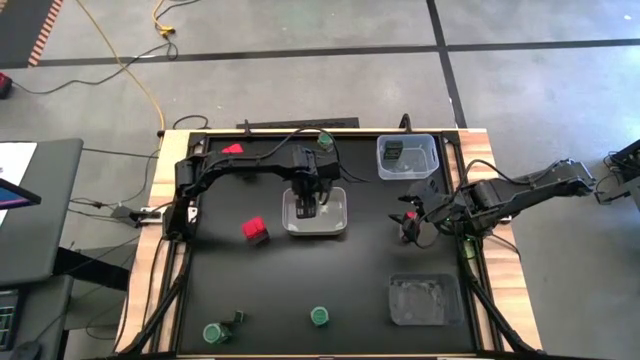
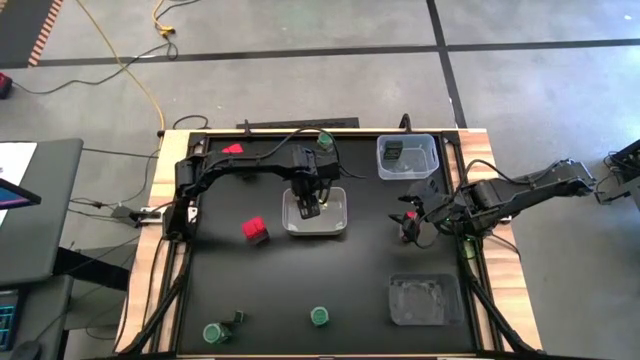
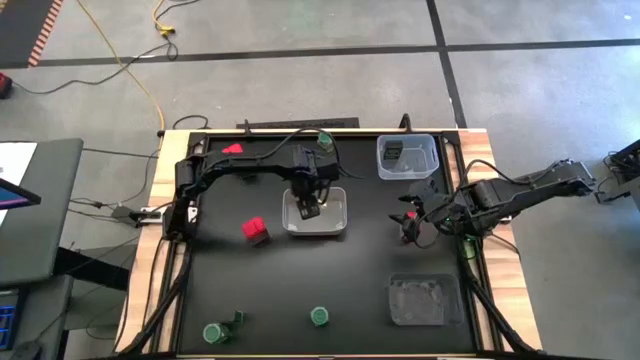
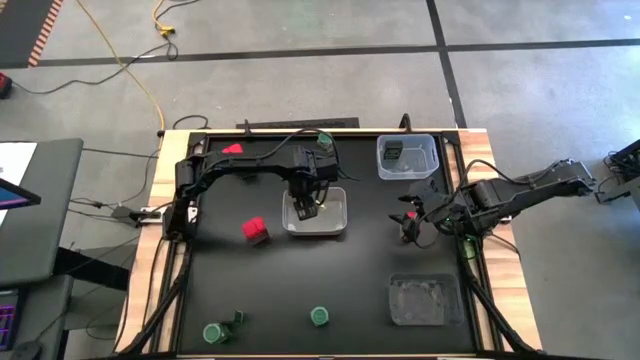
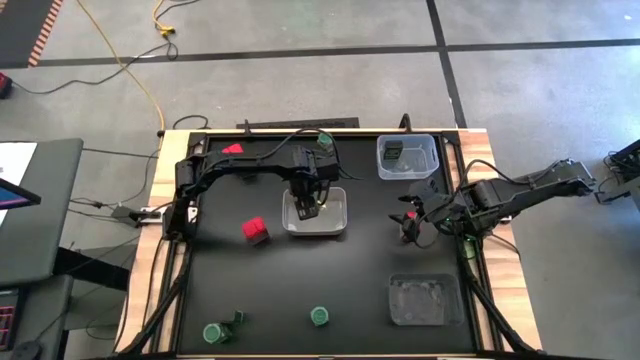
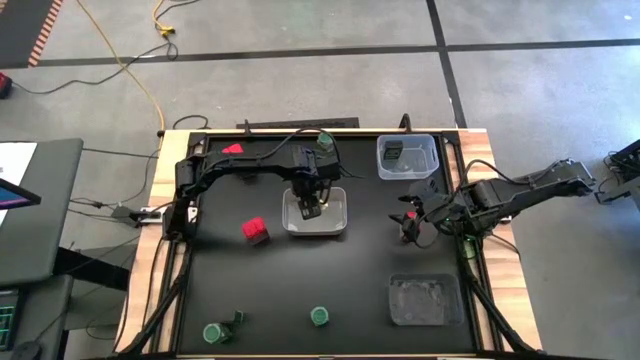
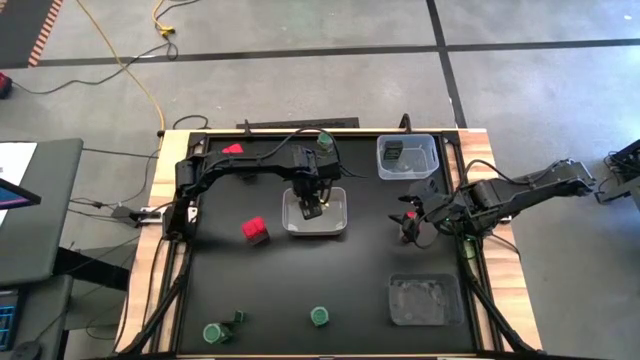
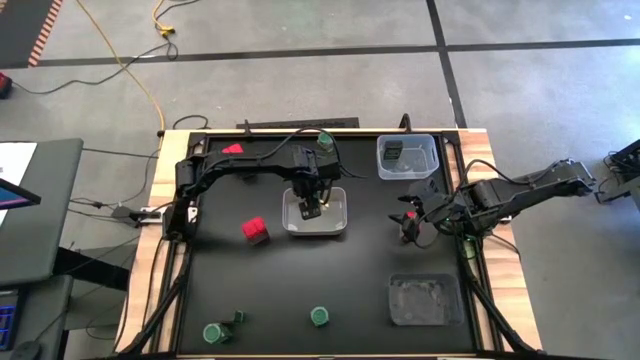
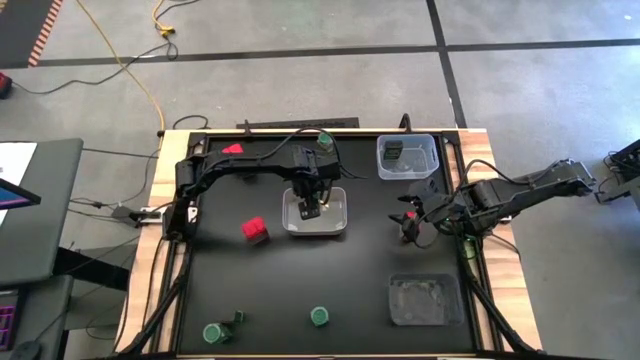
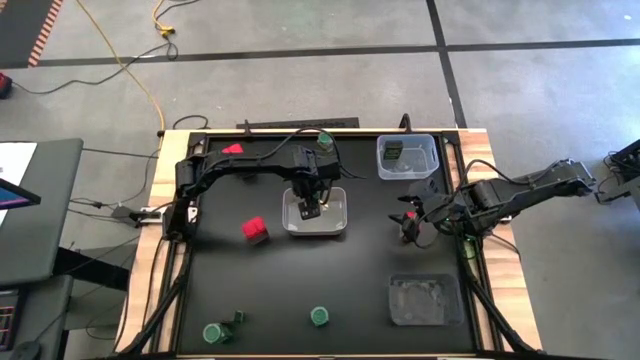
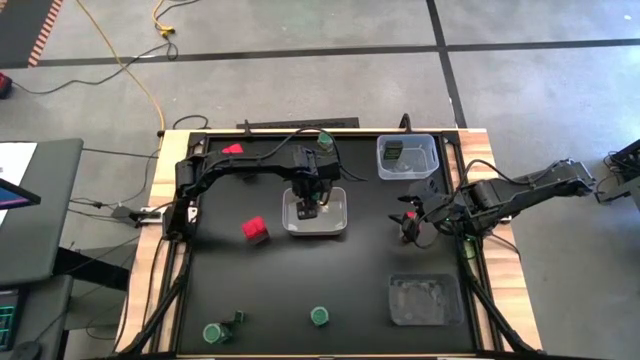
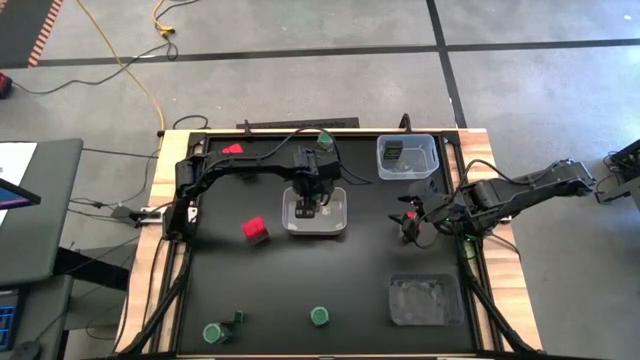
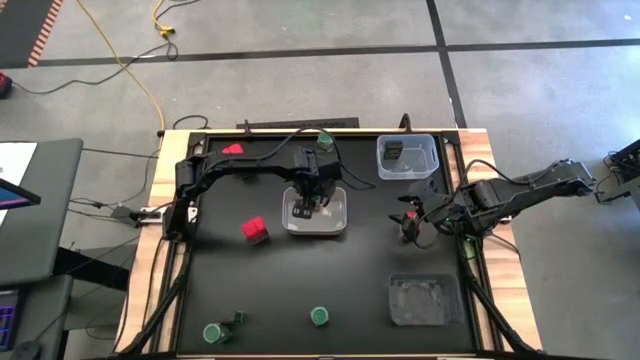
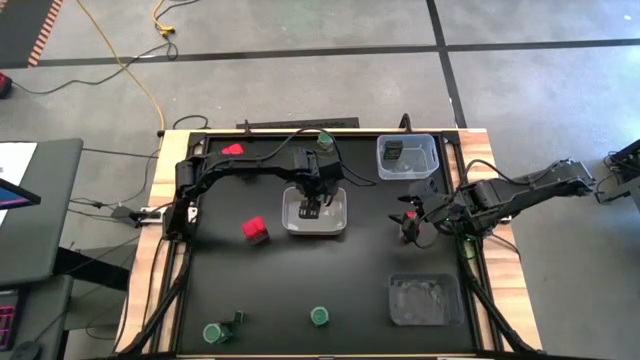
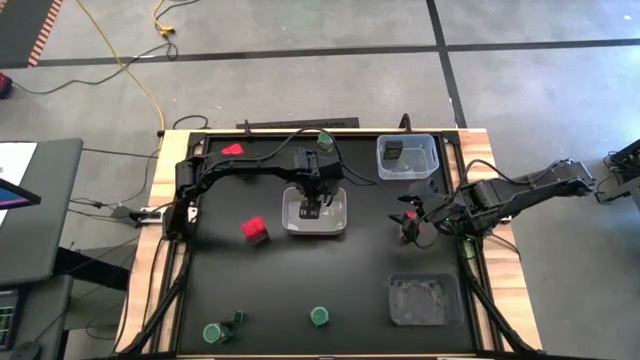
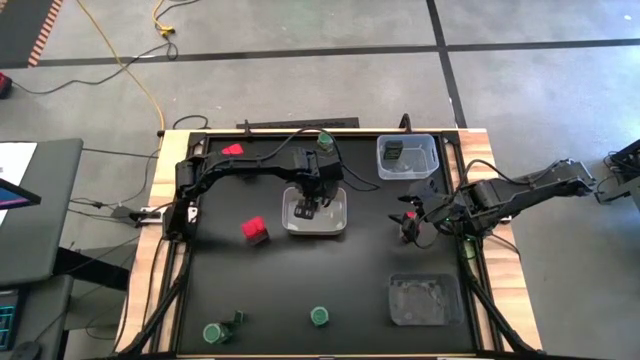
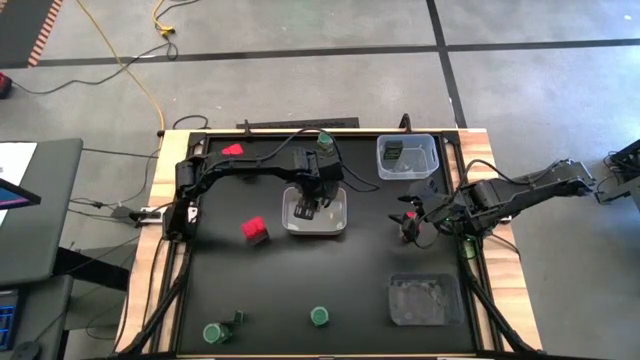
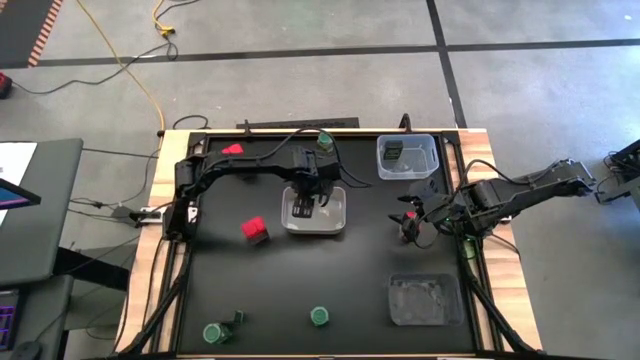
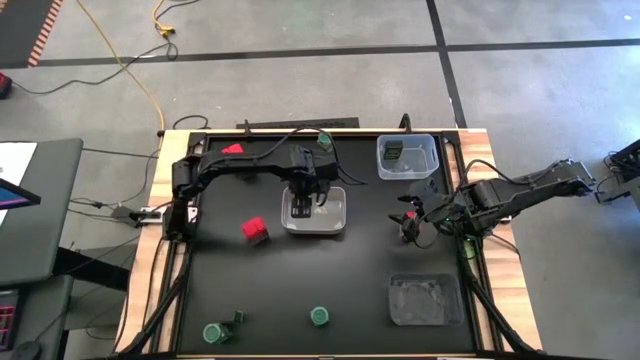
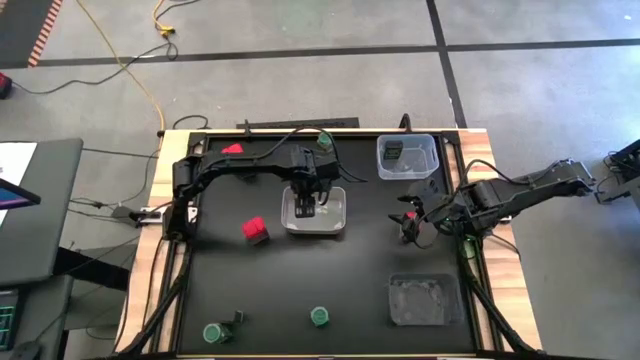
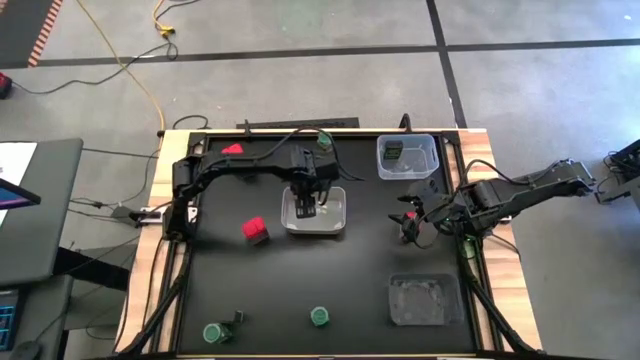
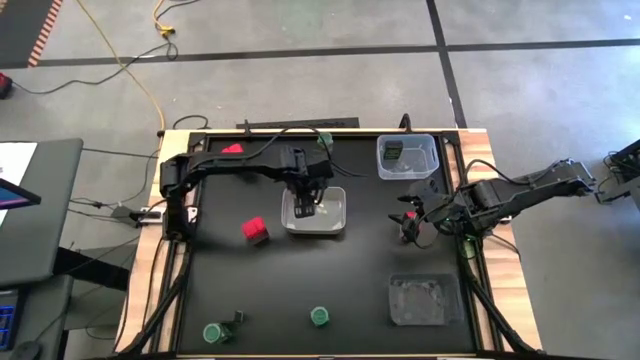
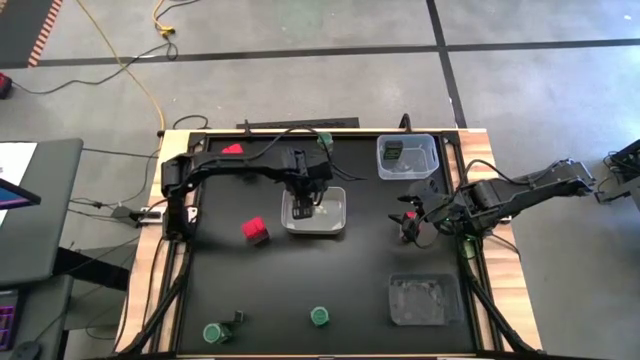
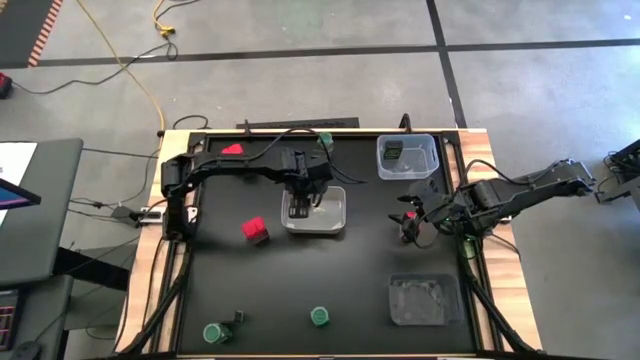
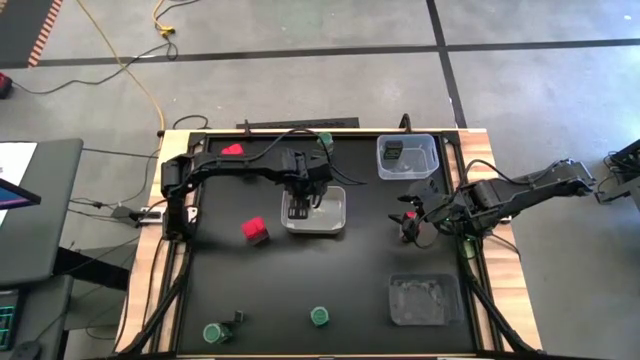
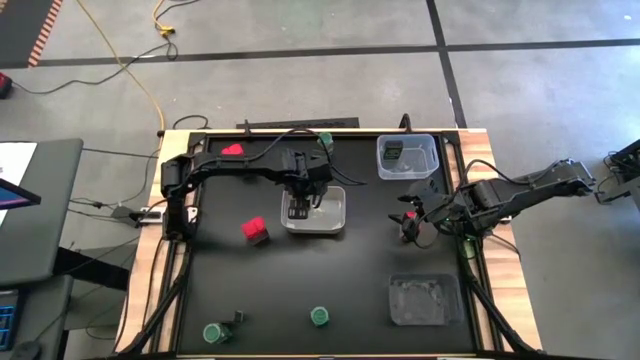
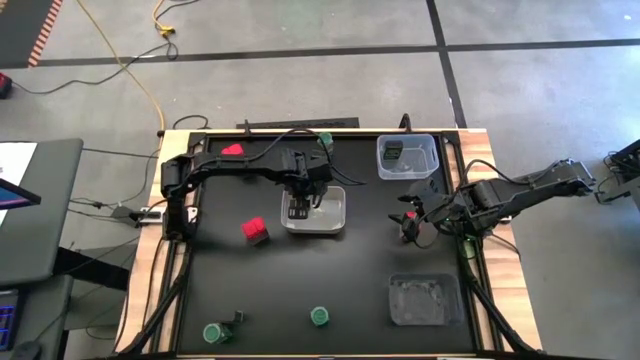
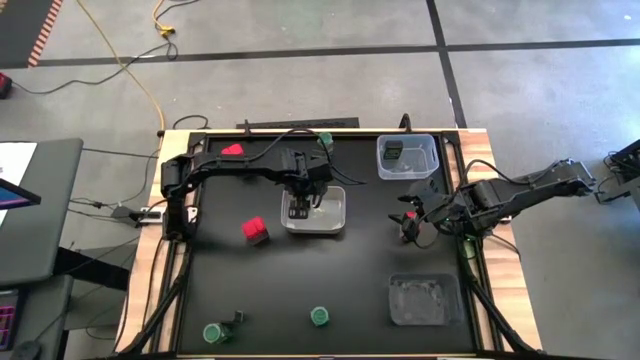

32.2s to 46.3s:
Task: Sort spices by type
Put the middle left green seasoning bottle into the white bin

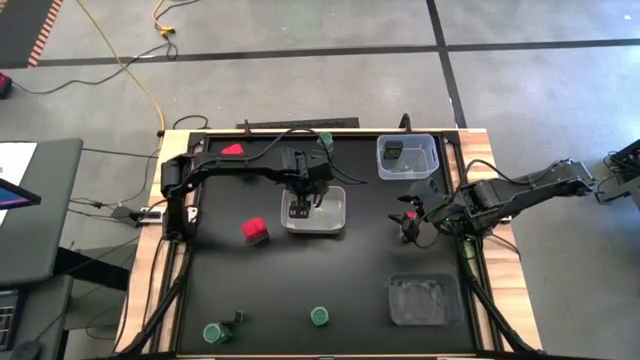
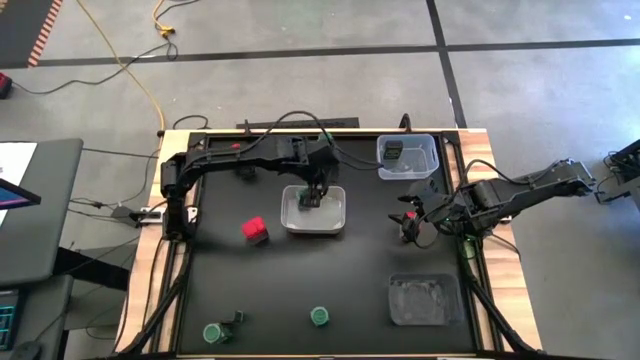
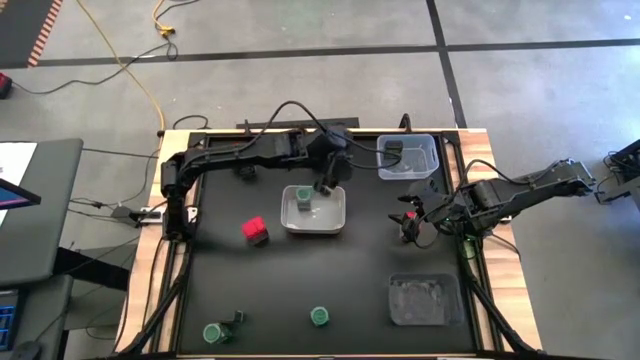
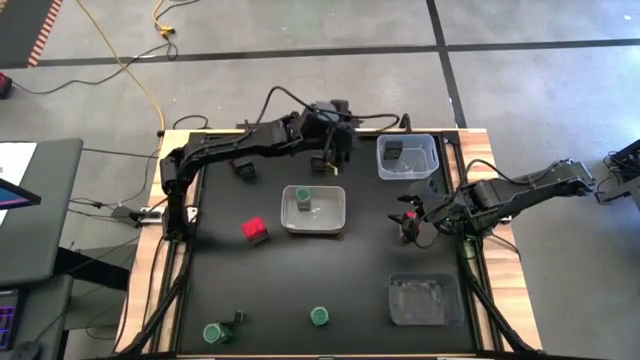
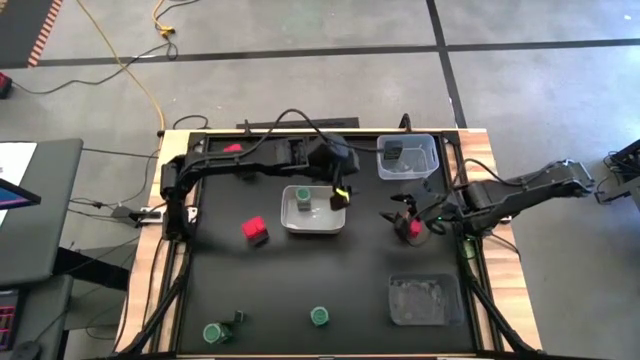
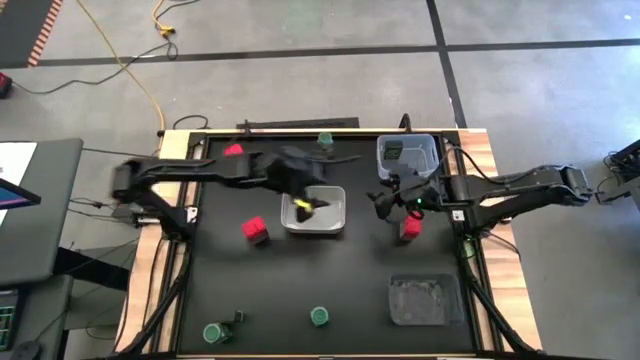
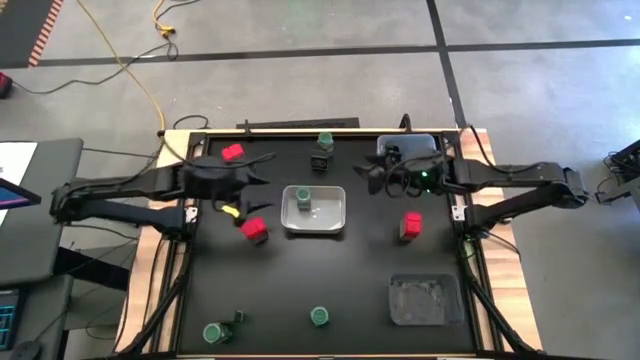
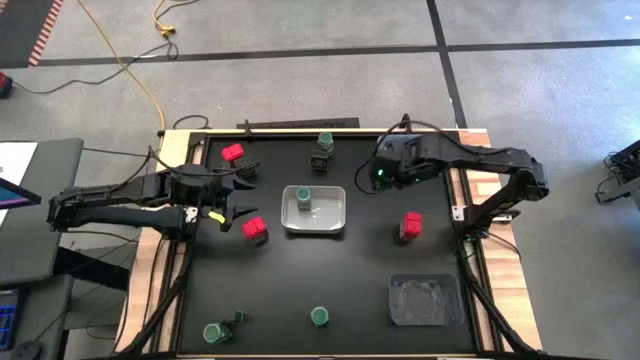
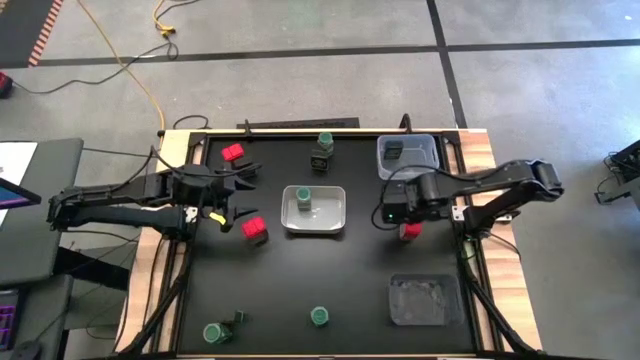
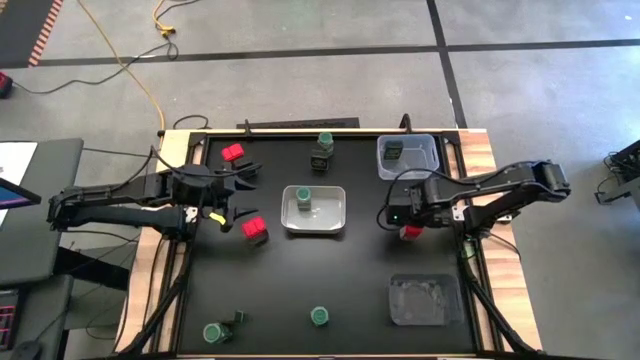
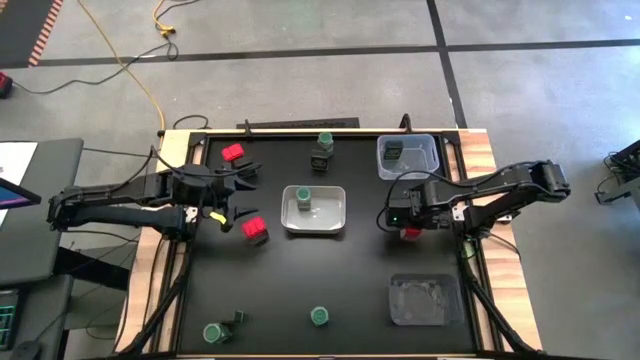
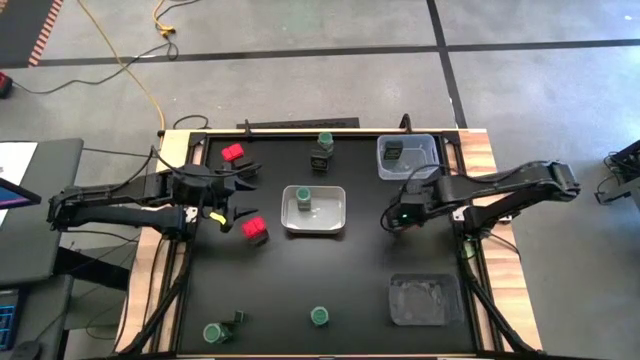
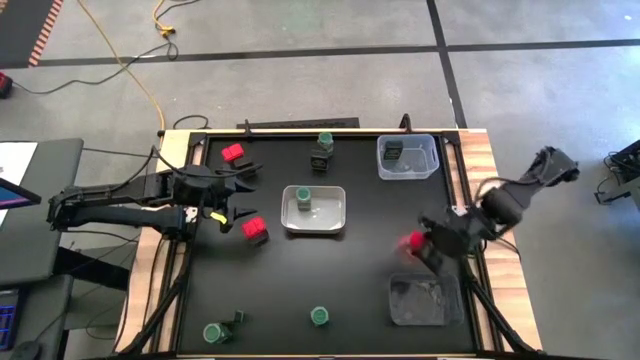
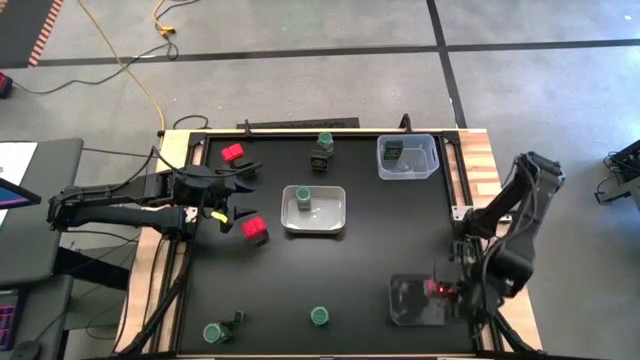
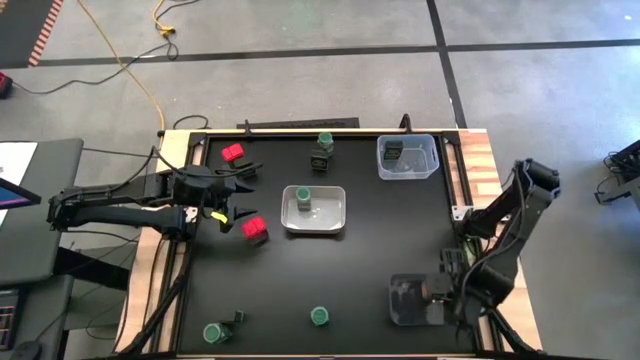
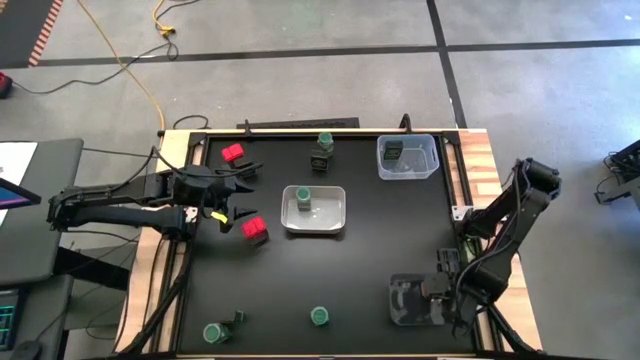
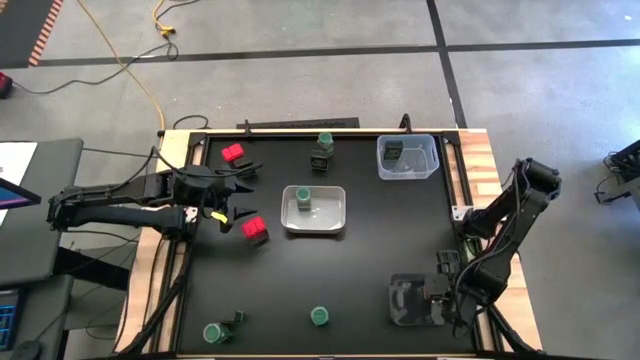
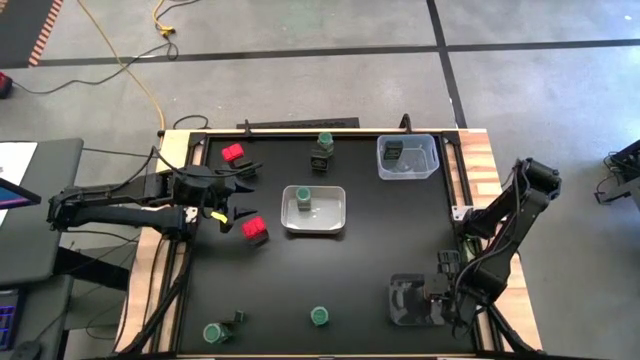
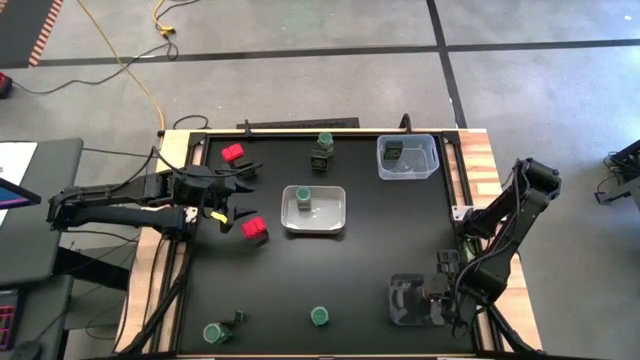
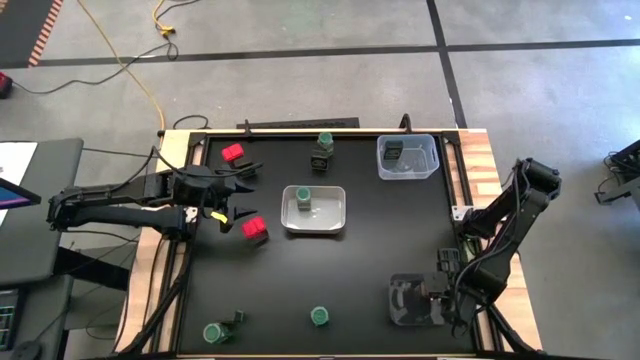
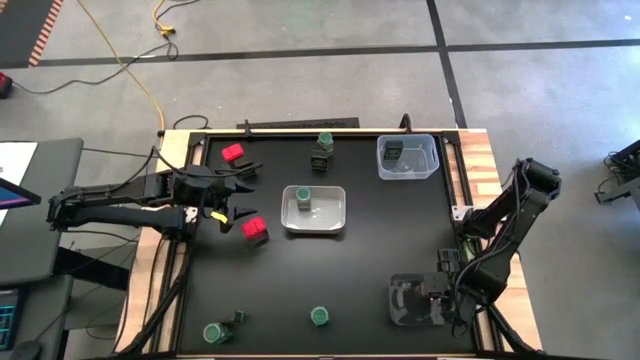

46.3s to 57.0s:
Put the bottom right red seasoning can into the black bin
